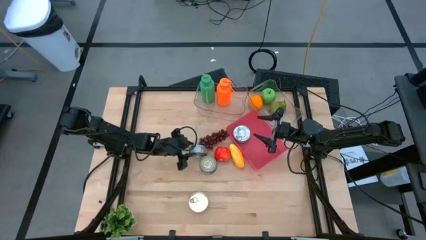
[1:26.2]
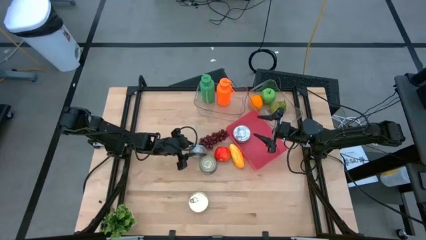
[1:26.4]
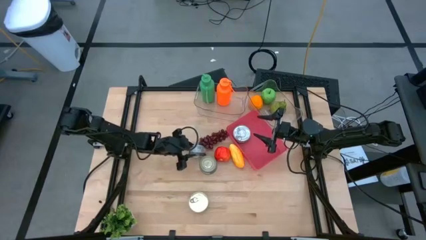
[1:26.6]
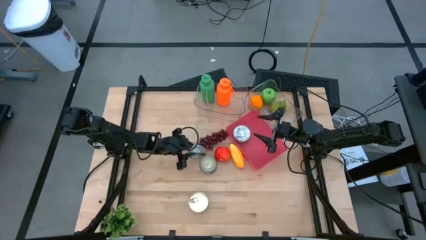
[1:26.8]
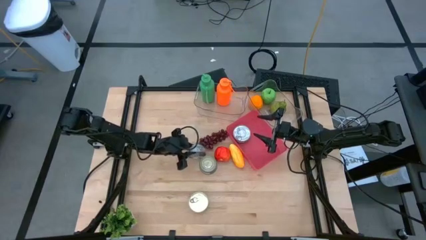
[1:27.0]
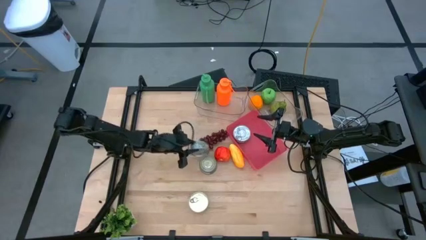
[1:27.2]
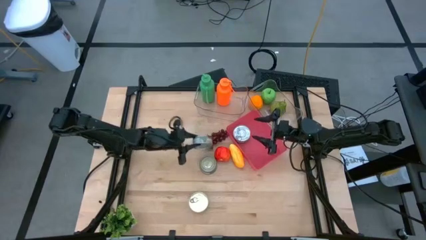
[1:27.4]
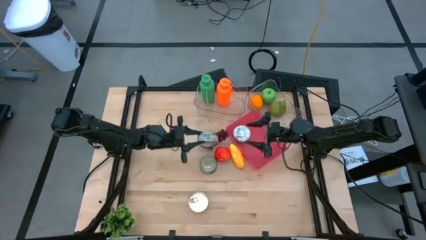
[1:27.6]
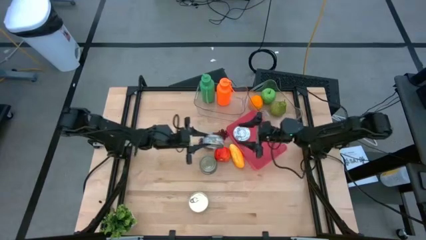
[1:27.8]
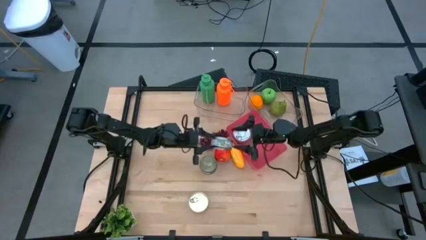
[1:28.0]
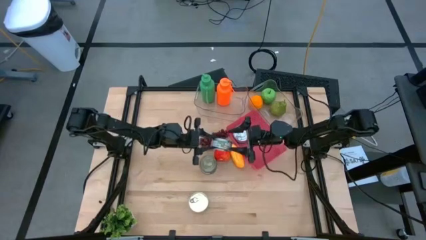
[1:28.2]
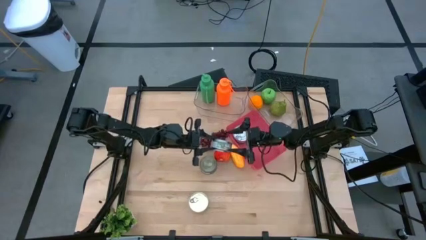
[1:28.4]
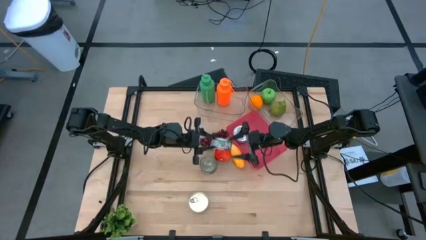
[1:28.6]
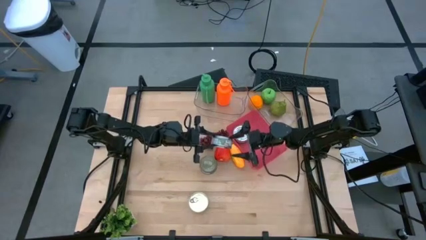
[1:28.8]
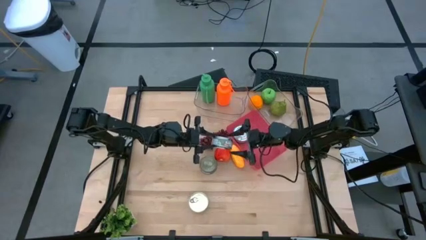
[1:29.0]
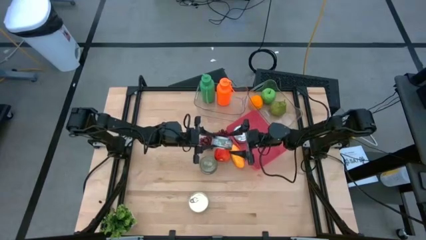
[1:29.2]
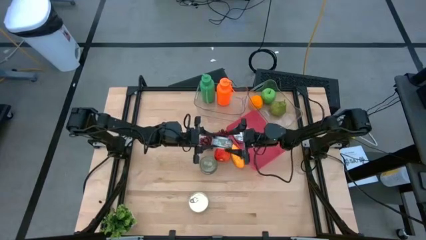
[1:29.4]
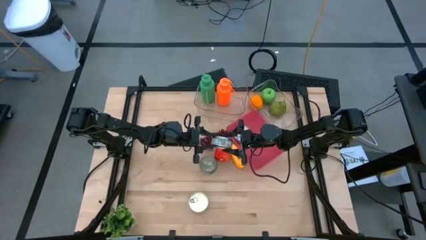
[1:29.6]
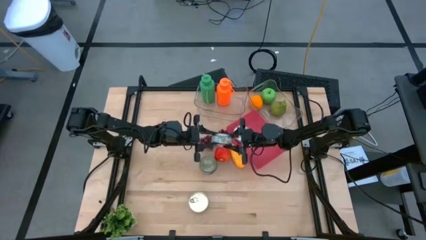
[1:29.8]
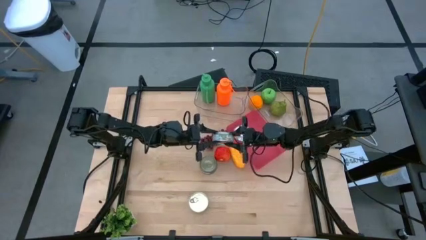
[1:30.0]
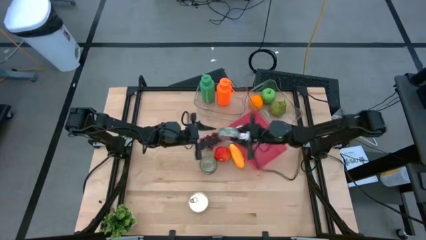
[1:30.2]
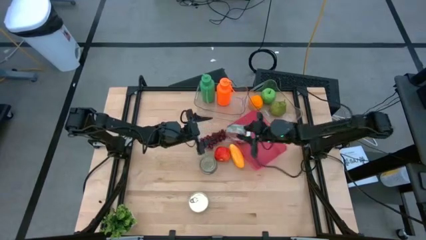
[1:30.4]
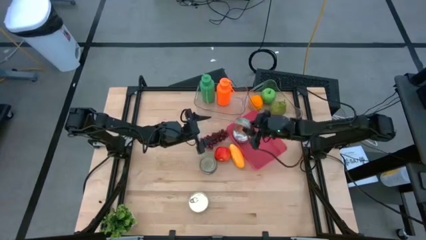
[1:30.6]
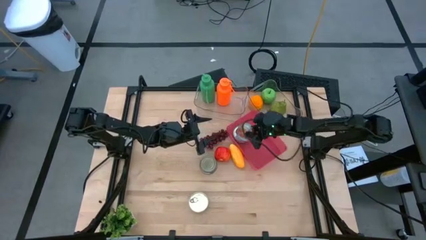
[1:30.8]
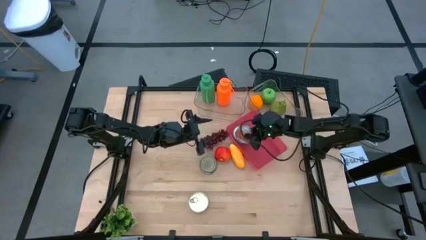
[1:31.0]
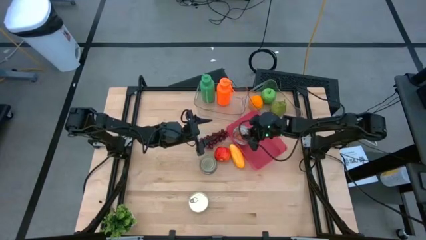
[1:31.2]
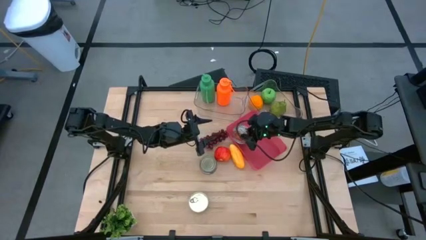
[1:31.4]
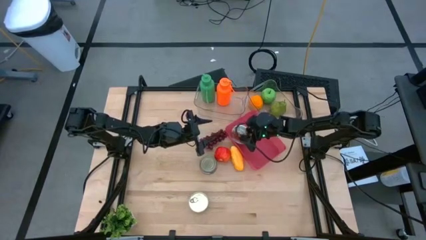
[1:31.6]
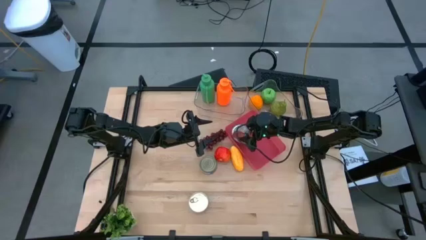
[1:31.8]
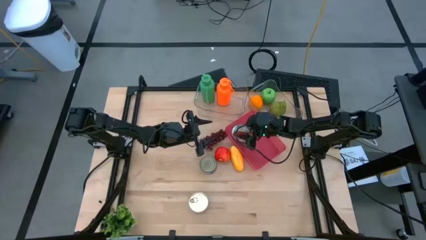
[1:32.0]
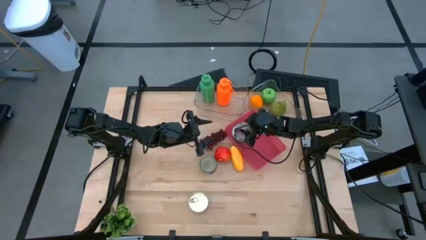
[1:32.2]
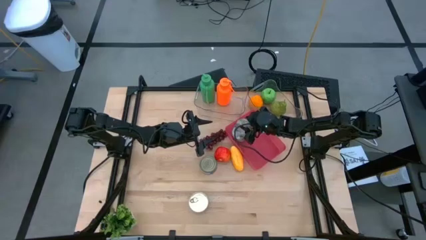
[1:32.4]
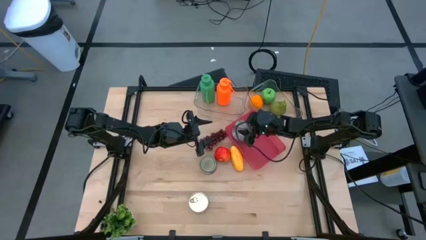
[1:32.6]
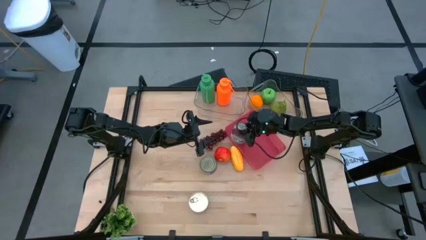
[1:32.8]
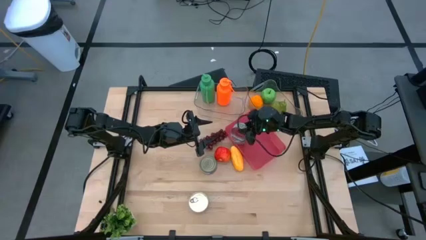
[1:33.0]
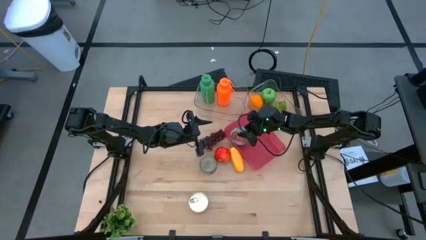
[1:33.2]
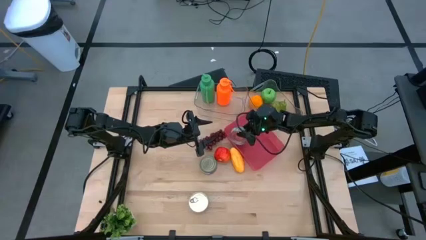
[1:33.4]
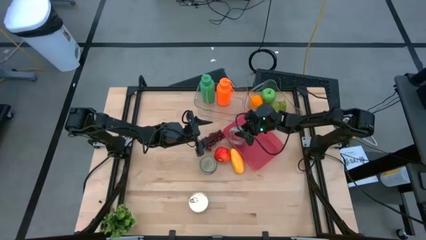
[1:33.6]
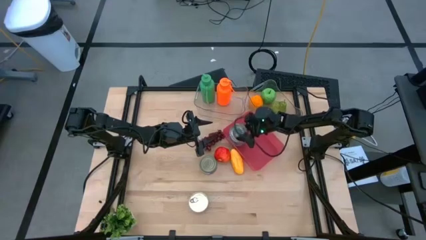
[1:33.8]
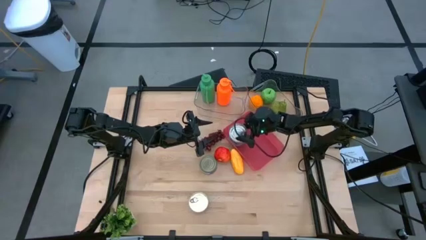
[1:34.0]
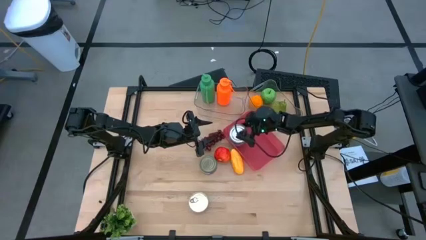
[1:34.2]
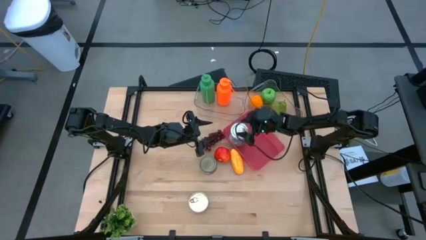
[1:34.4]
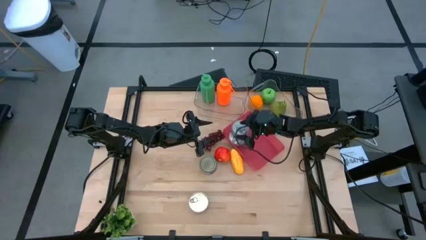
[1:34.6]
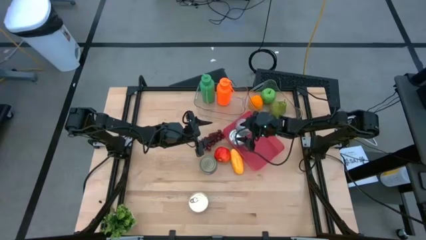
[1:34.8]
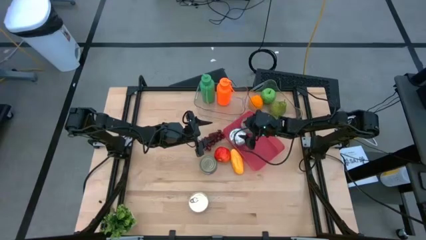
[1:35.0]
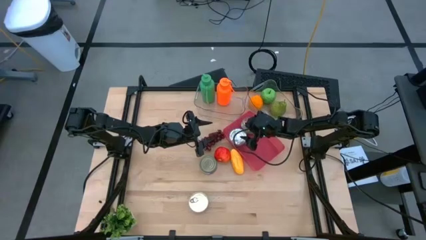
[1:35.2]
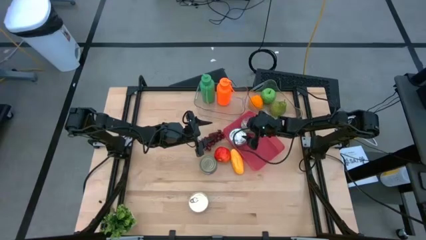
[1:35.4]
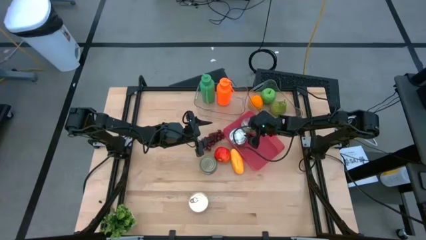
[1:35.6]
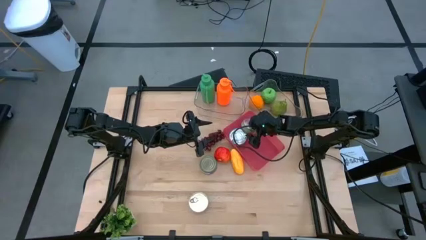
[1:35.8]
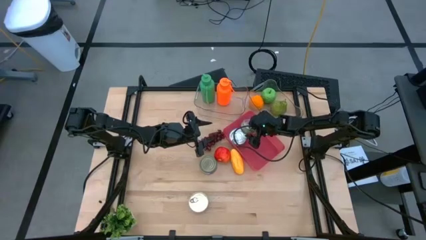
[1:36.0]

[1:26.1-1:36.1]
Task: Pick & Place Food Item
Put the green tuna can into the pink bin

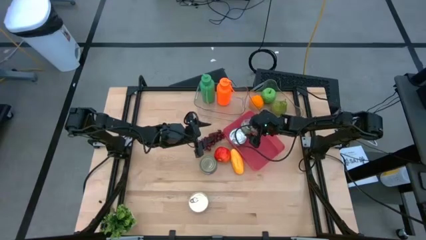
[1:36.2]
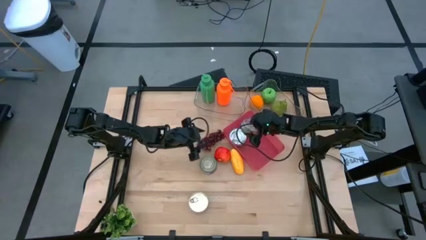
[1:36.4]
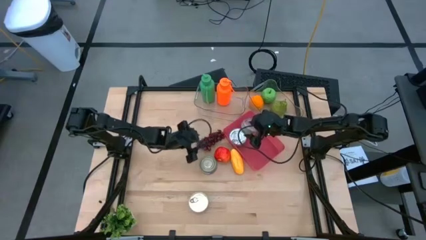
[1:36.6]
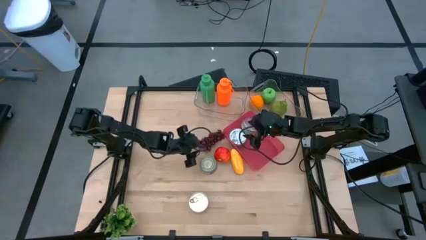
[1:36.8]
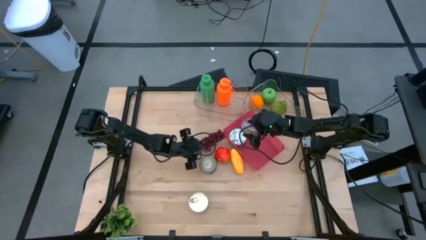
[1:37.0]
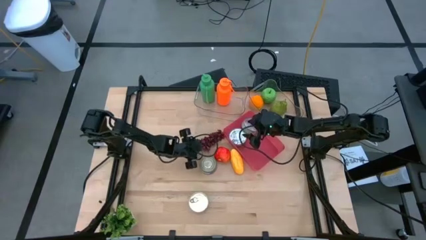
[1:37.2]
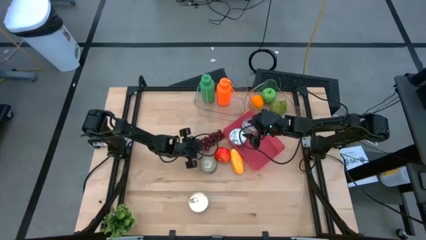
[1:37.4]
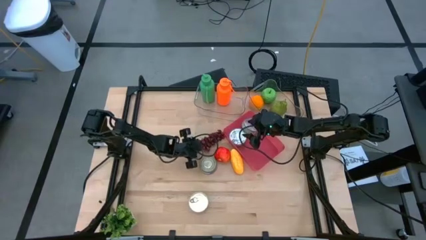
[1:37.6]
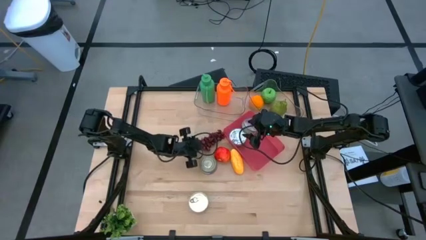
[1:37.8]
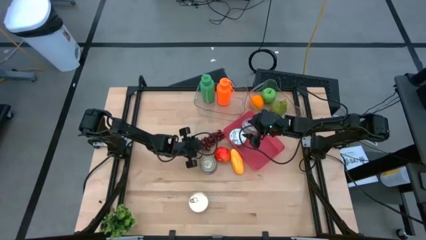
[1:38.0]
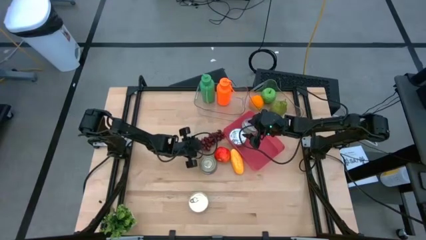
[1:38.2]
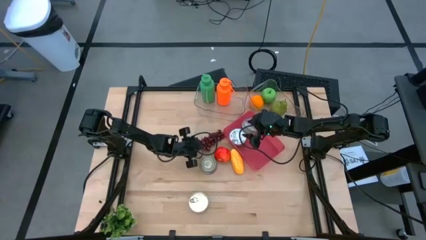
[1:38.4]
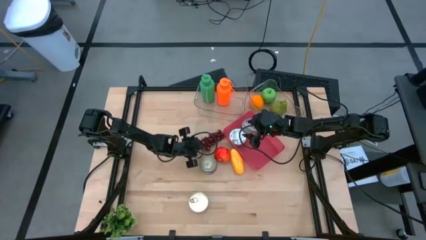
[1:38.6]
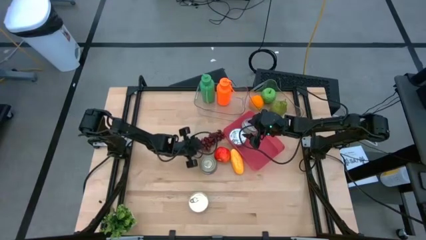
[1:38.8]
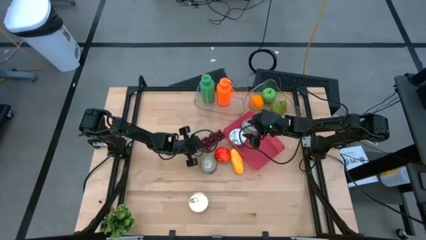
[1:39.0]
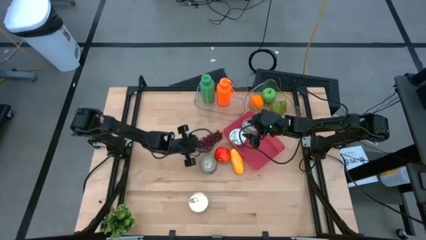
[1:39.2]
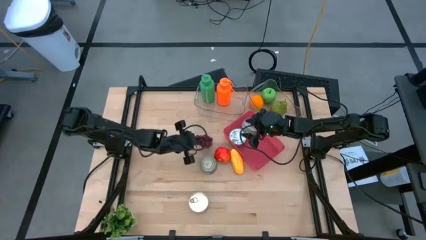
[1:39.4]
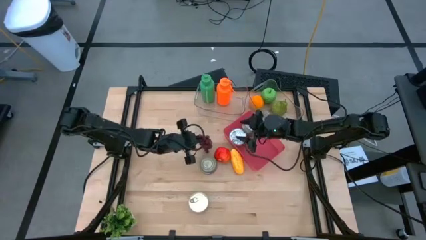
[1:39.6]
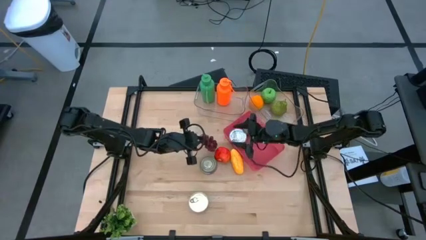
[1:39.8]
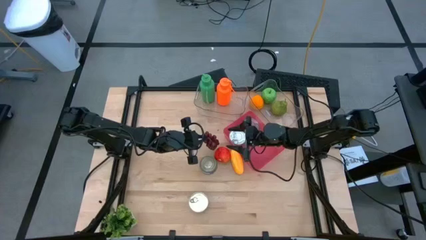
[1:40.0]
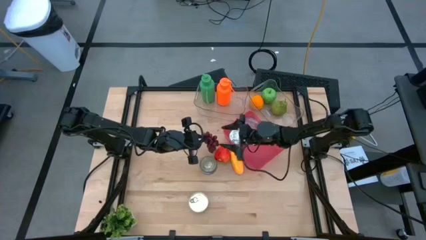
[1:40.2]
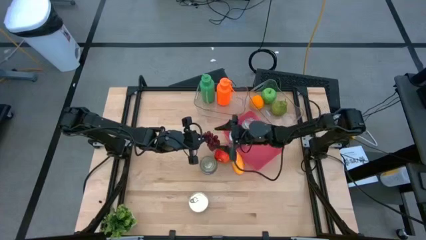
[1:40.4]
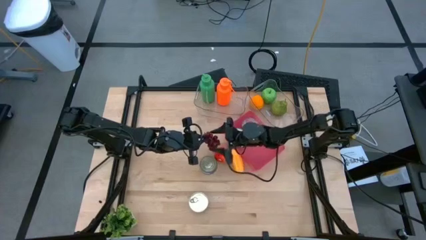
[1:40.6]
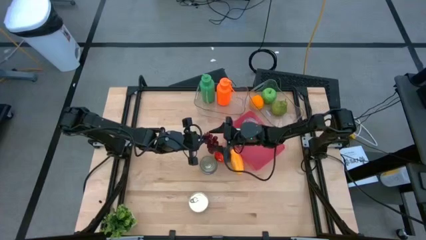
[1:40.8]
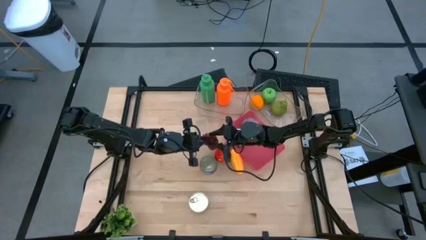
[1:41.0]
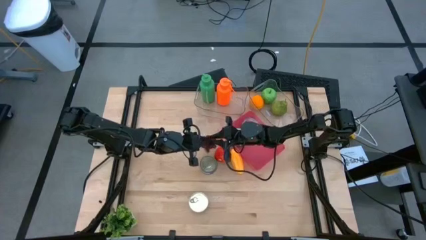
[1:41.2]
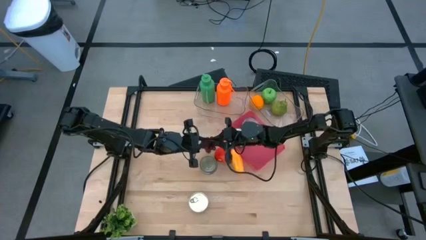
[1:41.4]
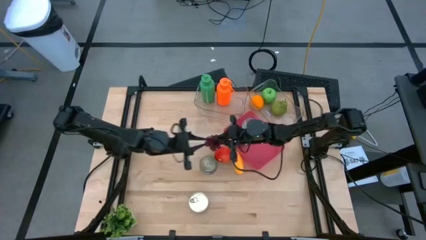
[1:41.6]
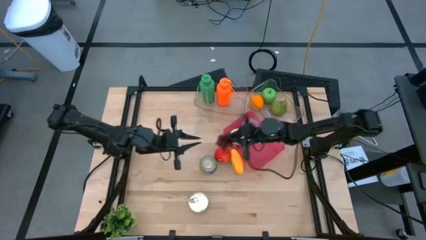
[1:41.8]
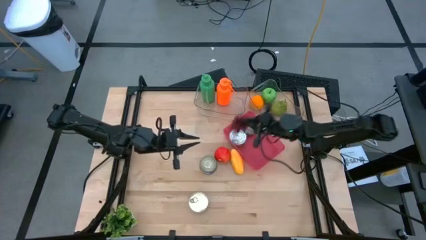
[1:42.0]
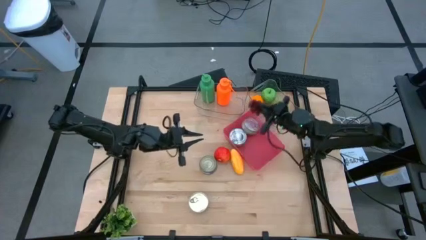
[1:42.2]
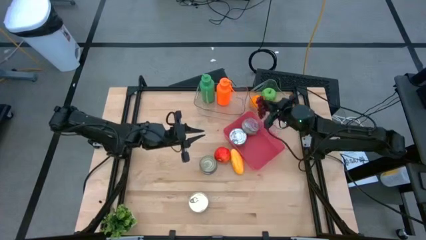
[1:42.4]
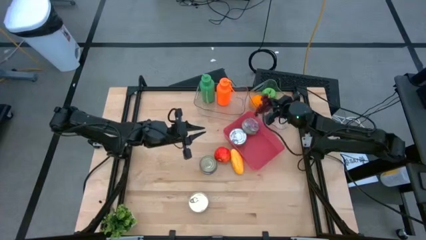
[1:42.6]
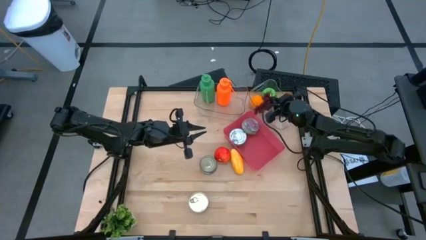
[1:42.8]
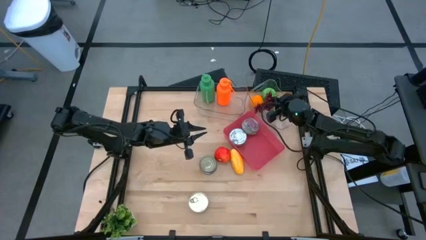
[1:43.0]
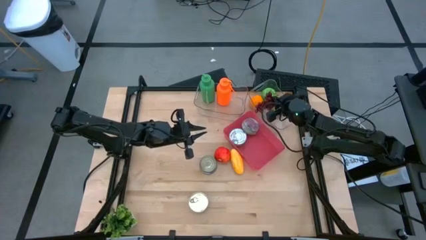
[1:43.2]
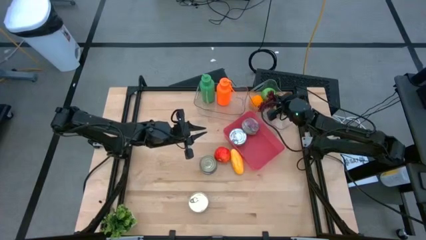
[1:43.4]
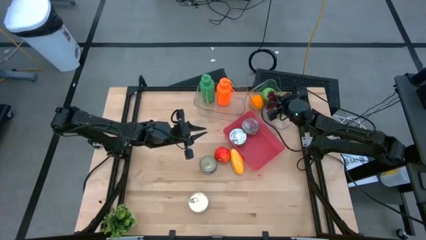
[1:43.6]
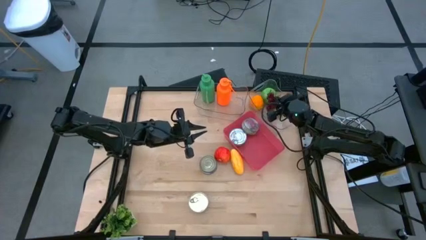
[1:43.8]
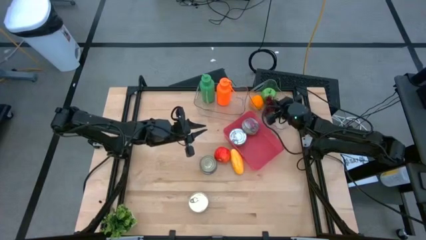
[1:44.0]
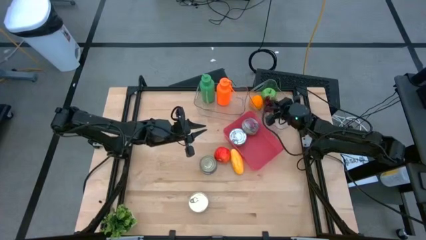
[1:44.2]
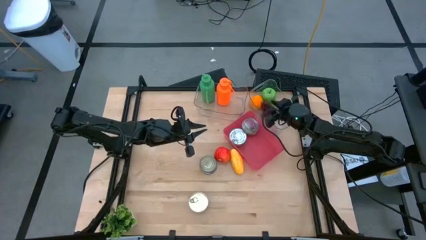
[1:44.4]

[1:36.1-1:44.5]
Put the purple grapes into the right transparent bin
